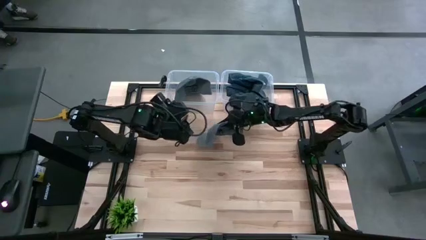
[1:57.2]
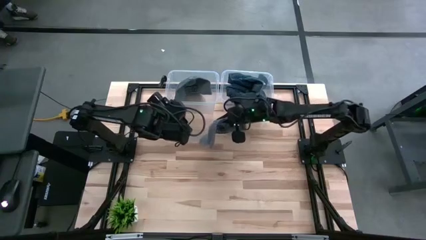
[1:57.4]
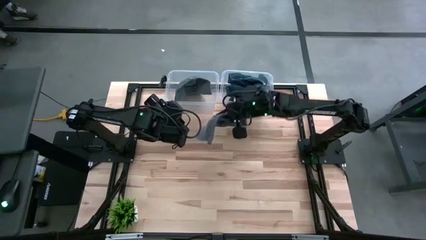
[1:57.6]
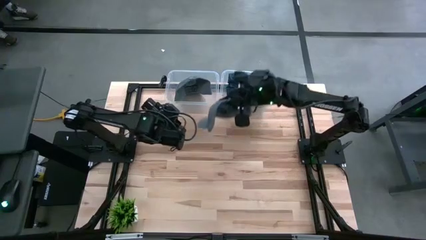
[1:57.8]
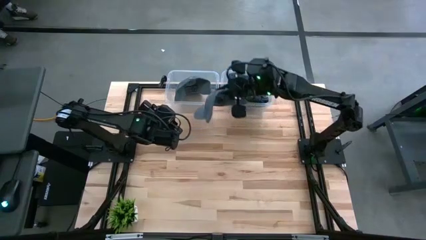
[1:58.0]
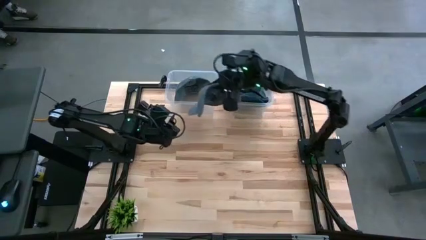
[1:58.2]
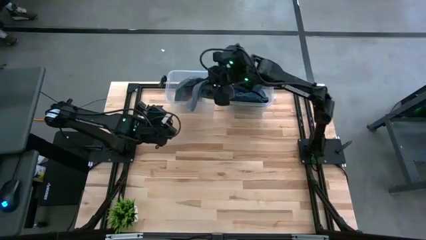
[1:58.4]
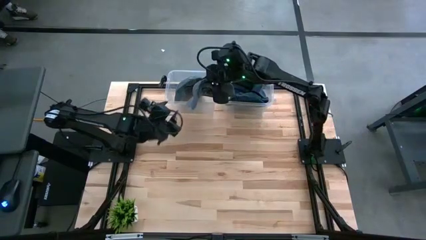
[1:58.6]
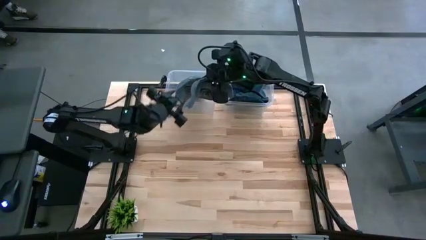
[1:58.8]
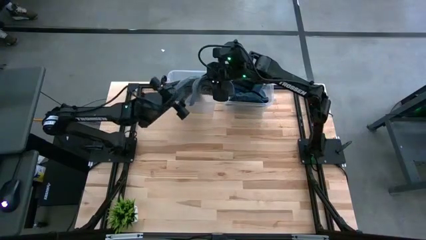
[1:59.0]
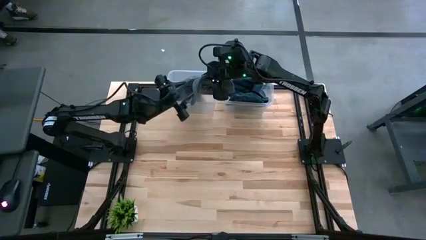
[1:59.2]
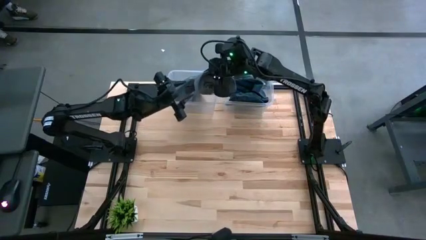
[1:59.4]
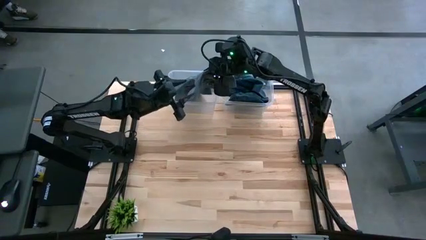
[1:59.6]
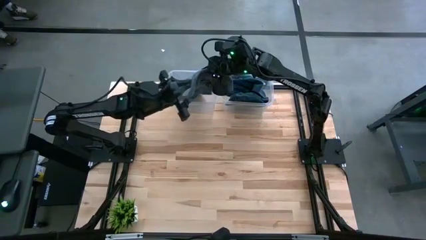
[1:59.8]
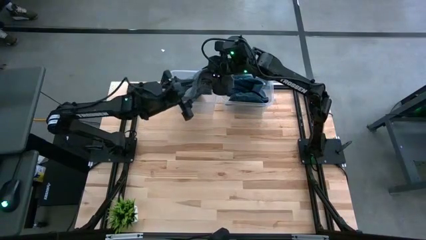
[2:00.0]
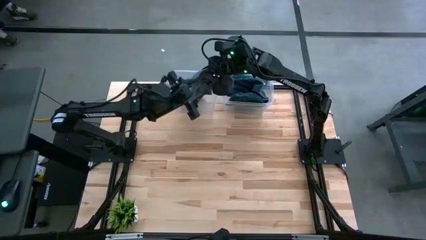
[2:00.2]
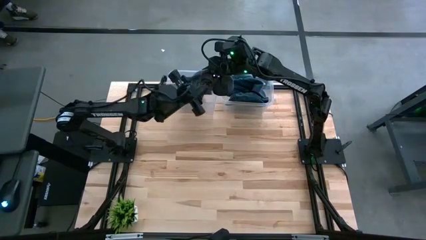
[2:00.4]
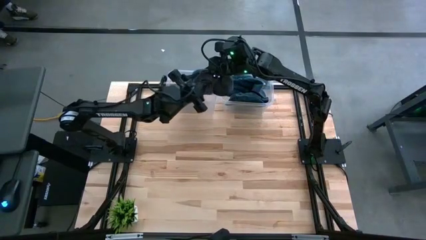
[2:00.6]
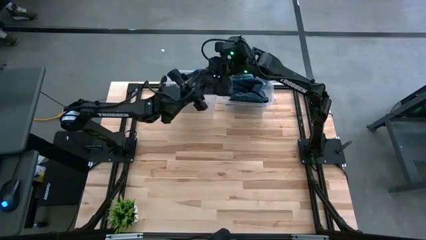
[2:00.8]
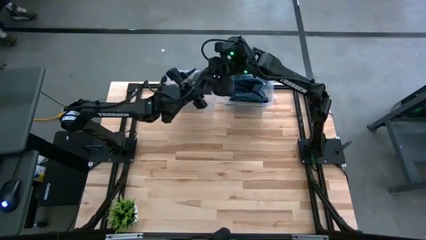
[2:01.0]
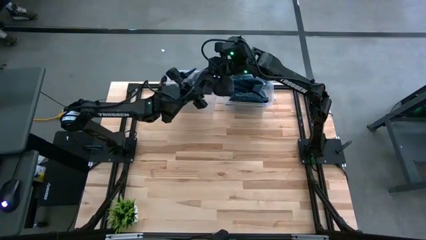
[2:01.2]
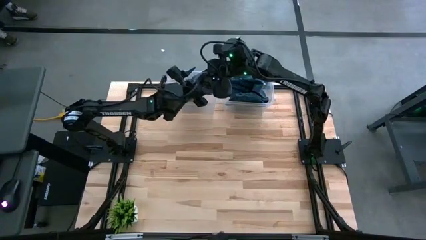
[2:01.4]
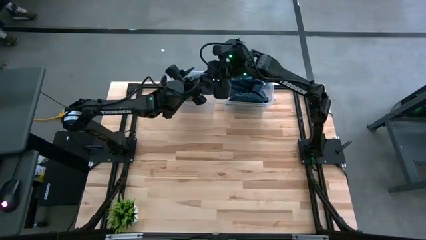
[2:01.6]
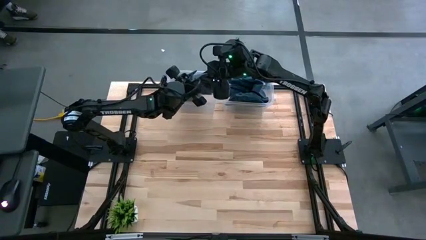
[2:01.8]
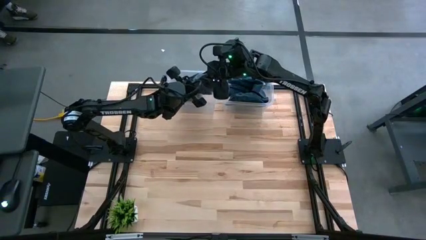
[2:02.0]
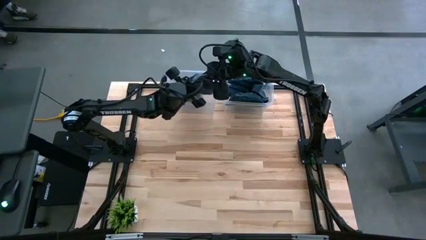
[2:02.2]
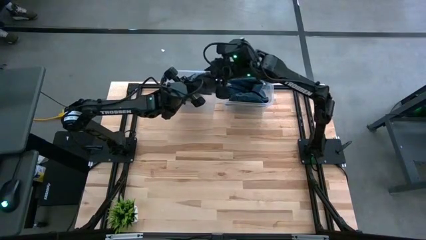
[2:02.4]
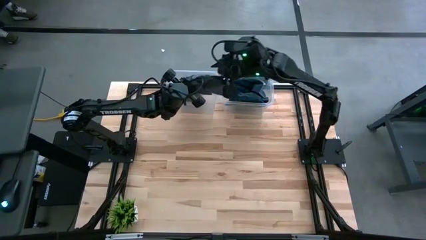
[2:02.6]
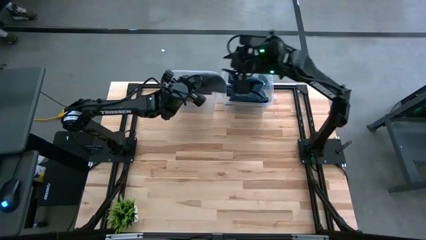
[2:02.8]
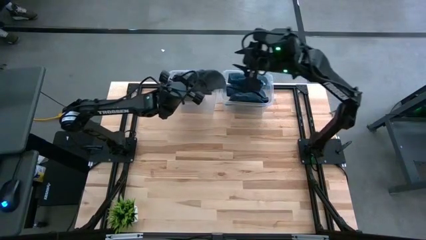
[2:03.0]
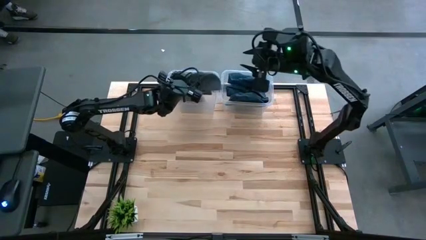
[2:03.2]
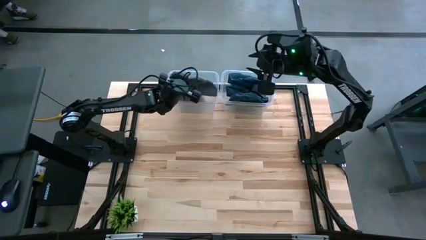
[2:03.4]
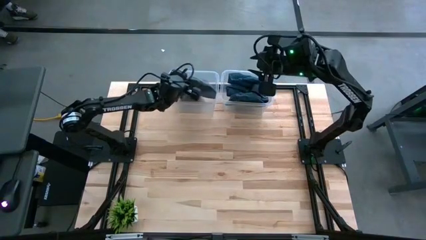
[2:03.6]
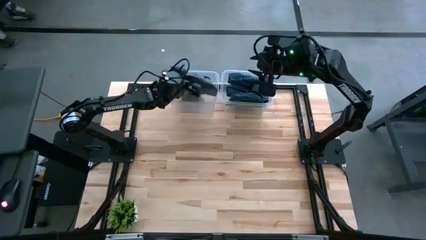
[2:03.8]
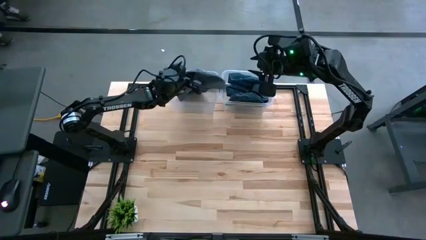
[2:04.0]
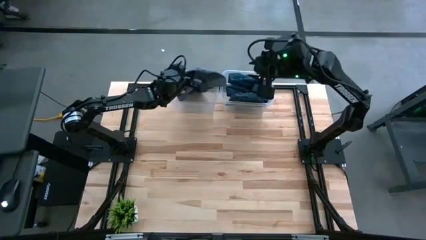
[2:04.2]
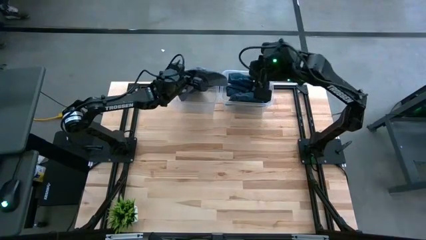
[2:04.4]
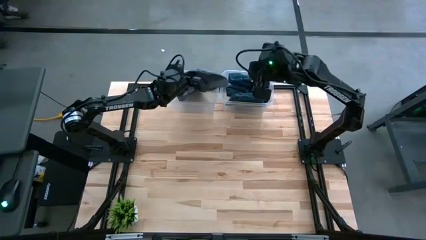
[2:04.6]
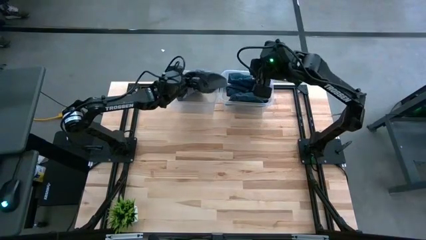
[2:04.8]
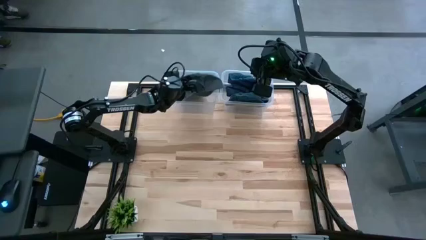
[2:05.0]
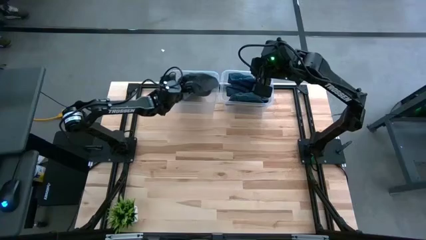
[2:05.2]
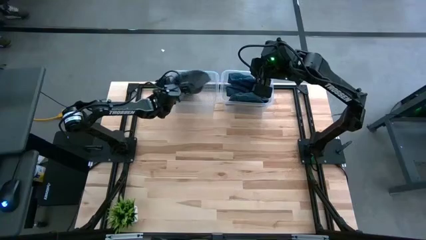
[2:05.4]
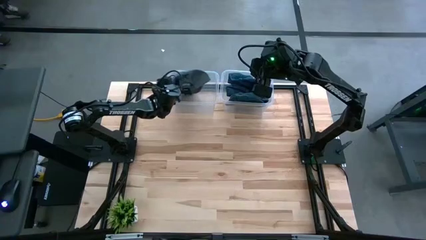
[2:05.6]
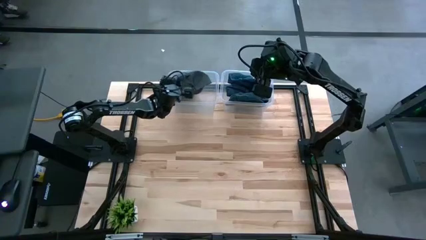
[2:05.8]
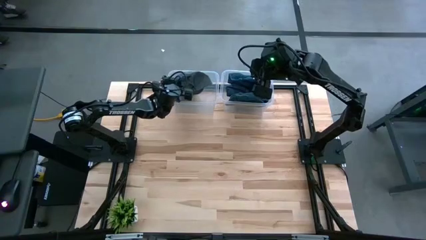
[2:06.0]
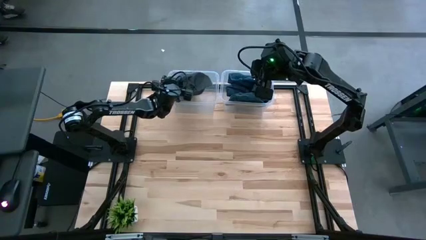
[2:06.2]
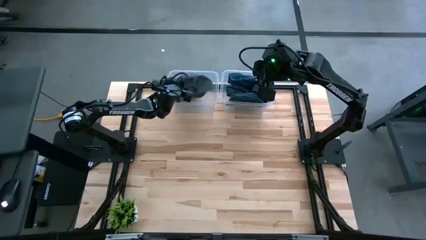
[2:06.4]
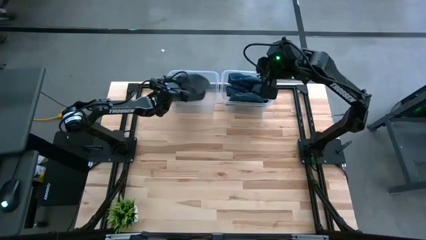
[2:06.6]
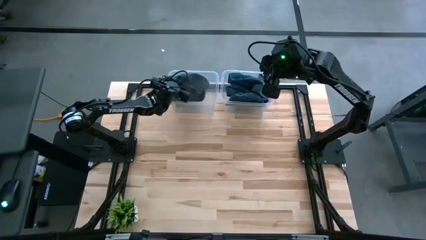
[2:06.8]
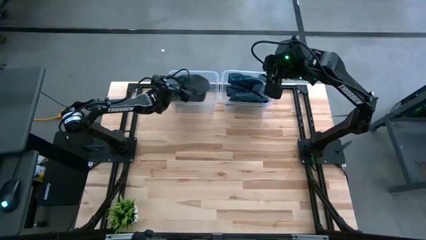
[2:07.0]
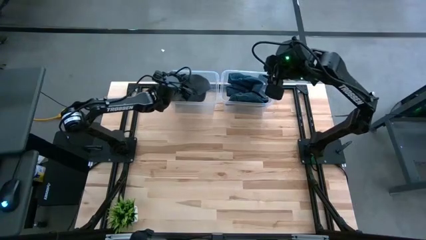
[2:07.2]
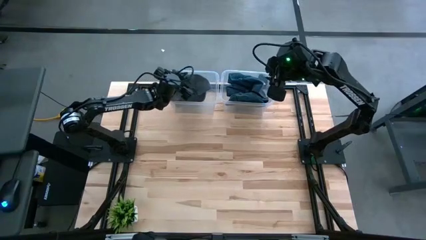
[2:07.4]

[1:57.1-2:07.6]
Task: Pick & Place hat
Put the gray cap into the left transparent bin

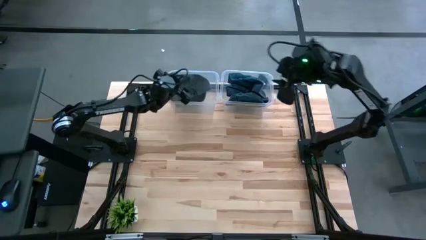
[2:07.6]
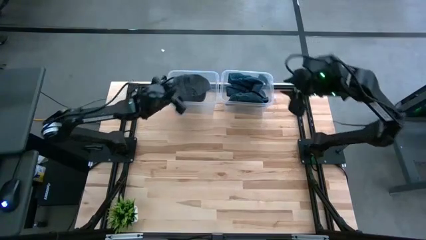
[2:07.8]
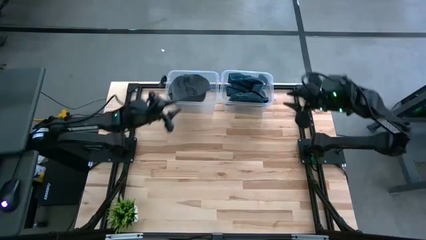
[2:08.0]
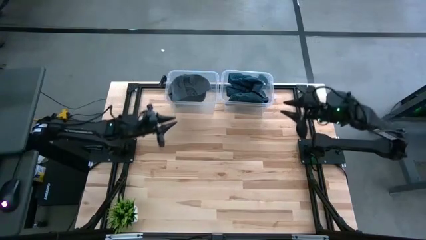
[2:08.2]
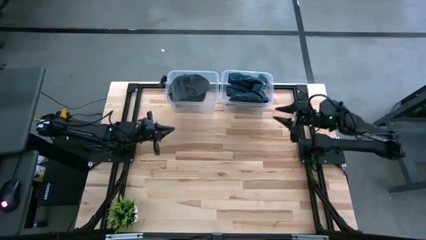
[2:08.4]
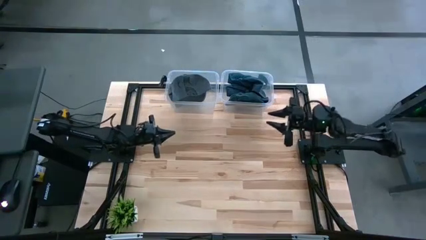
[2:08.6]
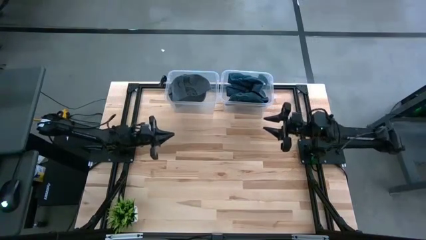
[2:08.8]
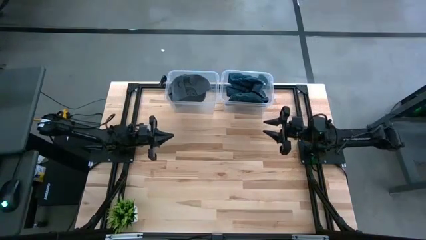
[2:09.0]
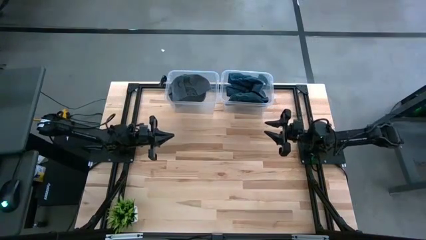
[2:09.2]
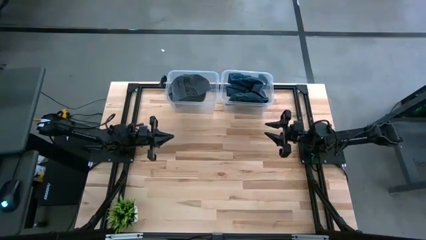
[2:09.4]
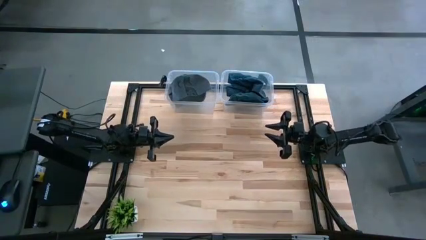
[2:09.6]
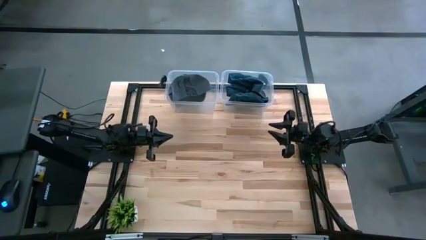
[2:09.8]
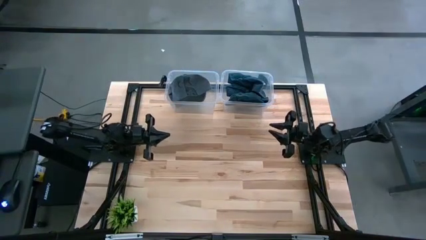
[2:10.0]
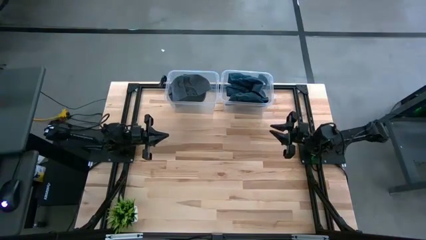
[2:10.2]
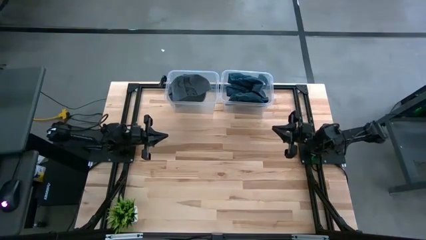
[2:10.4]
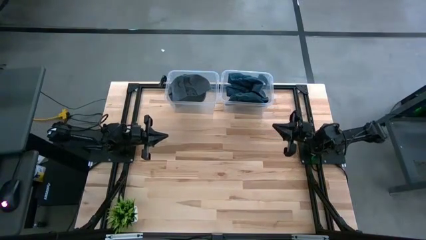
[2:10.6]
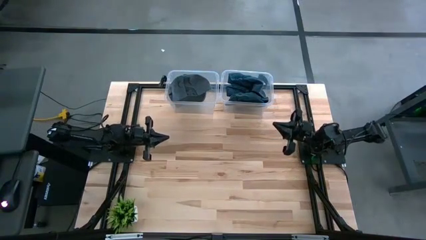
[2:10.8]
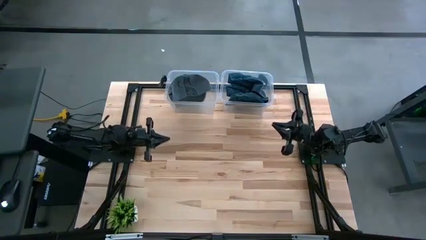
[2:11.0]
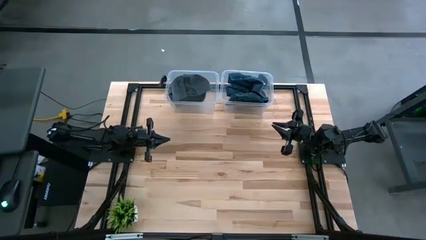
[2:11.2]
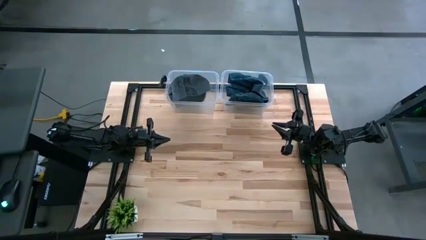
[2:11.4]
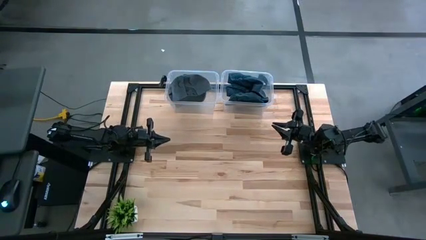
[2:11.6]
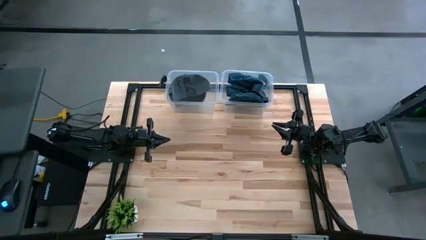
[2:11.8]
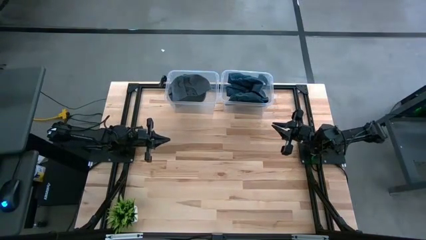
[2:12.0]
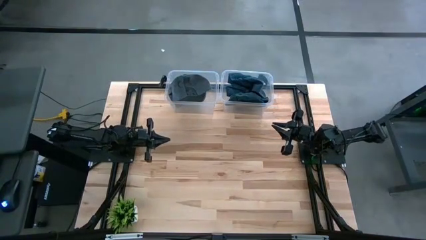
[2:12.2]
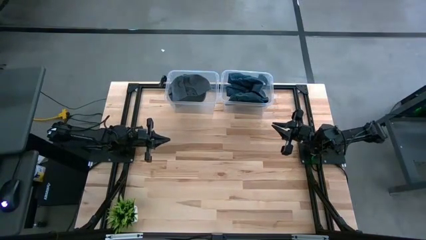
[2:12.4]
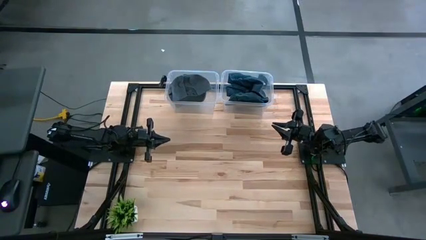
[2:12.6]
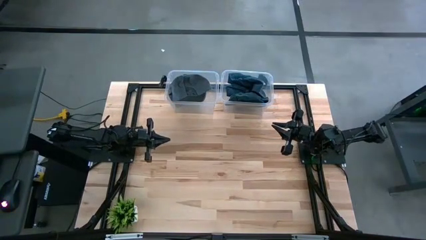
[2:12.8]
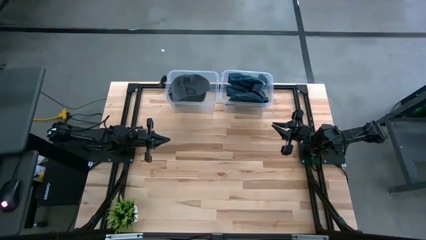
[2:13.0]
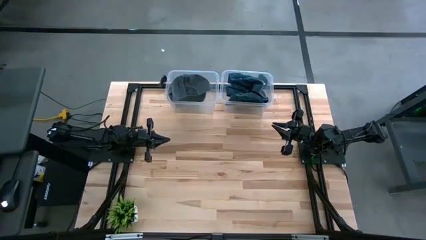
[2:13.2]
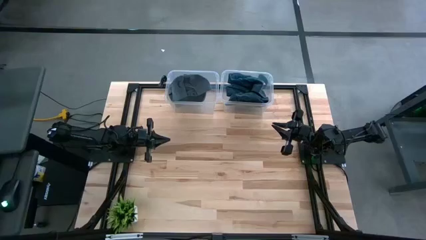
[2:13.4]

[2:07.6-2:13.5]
Return to Home Position

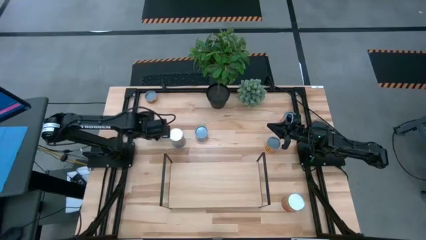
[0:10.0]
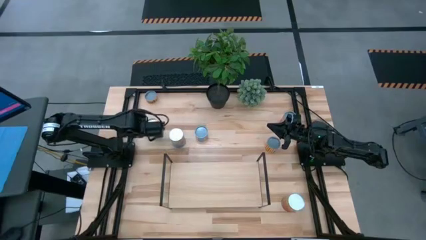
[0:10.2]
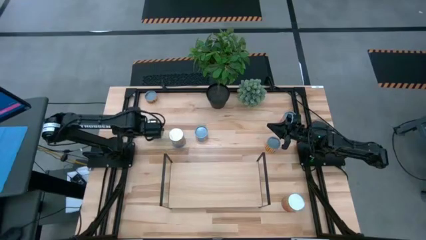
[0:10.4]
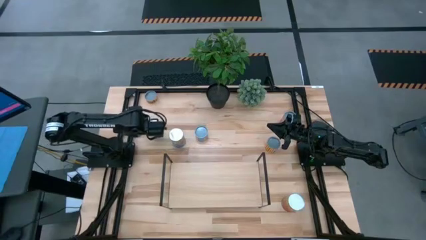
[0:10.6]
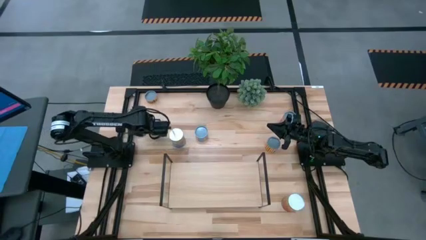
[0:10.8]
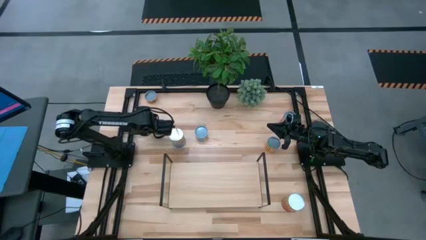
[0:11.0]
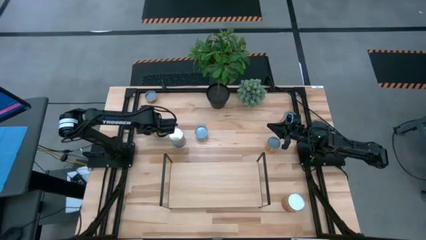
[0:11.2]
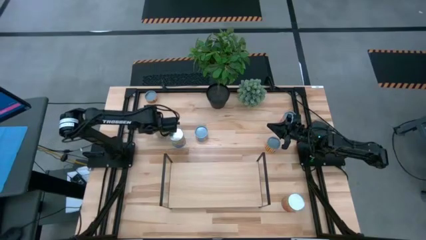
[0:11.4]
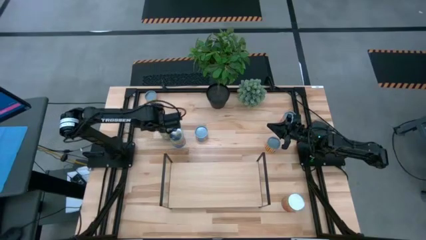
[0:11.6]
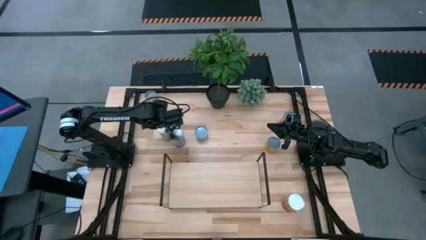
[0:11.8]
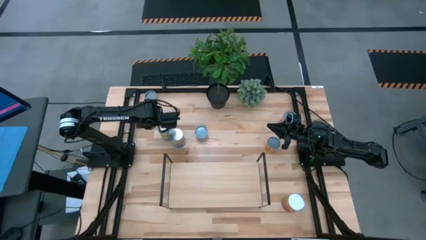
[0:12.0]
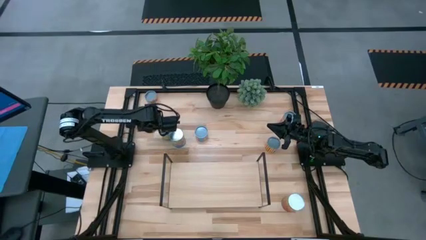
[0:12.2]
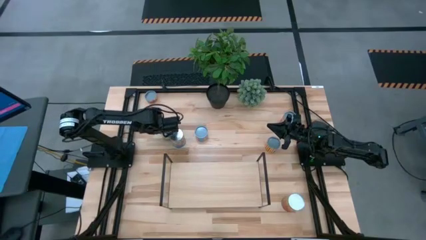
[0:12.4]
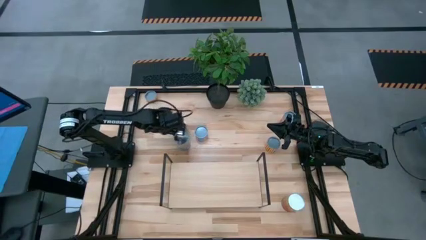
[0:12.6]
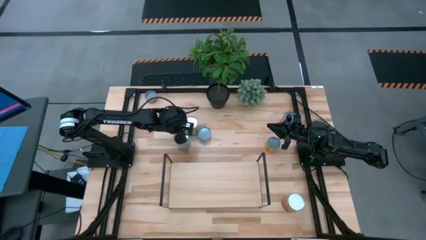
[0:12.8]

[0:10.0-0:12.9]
Task: Pick and place cans onto a shelf
Adjust the green pear can
